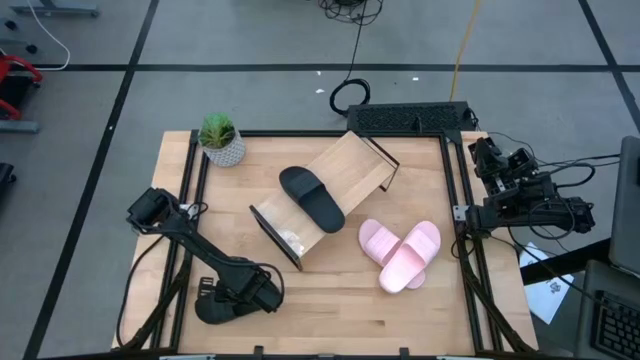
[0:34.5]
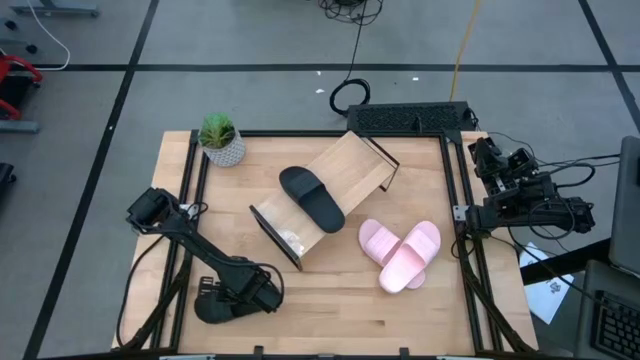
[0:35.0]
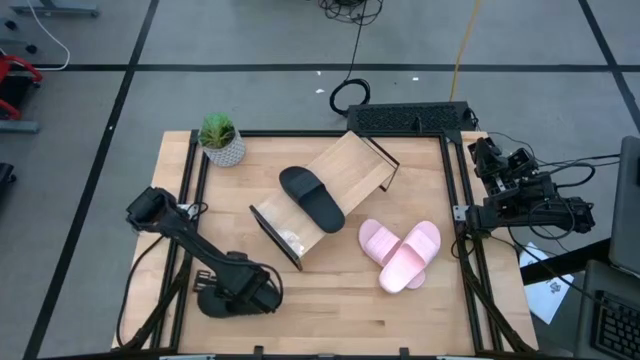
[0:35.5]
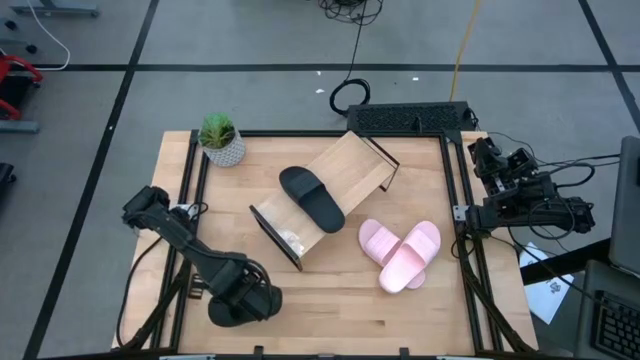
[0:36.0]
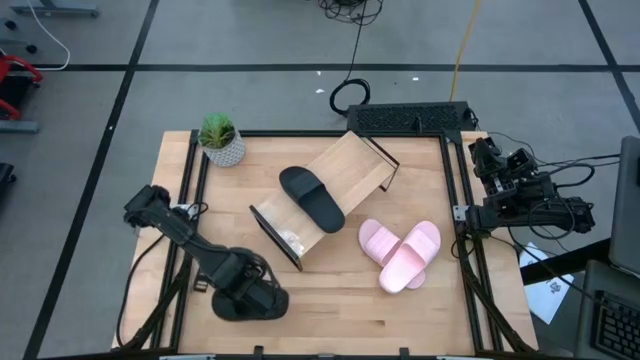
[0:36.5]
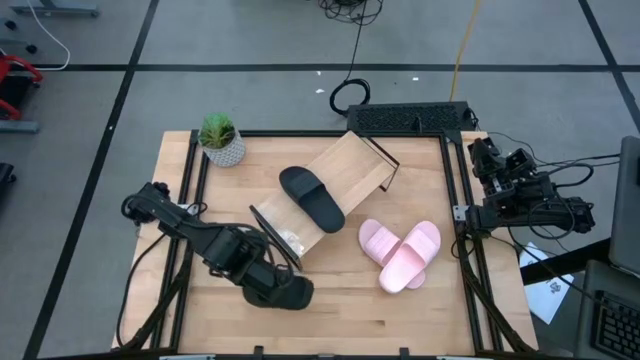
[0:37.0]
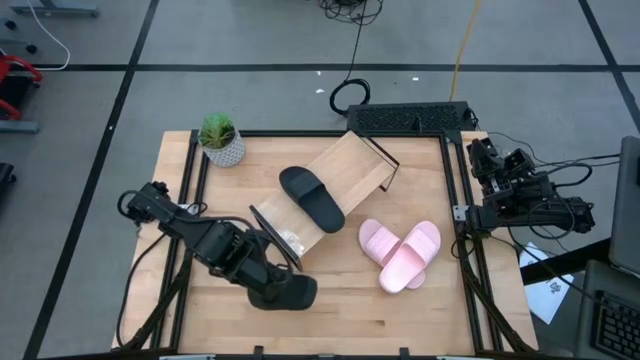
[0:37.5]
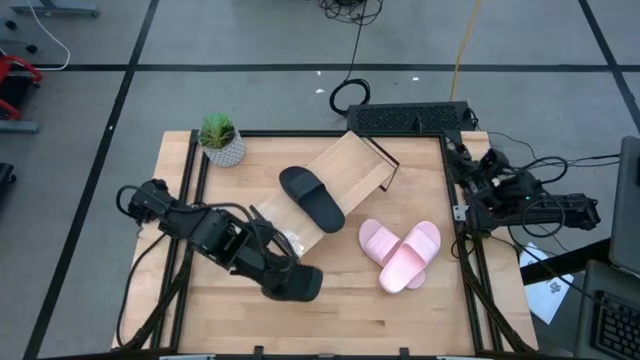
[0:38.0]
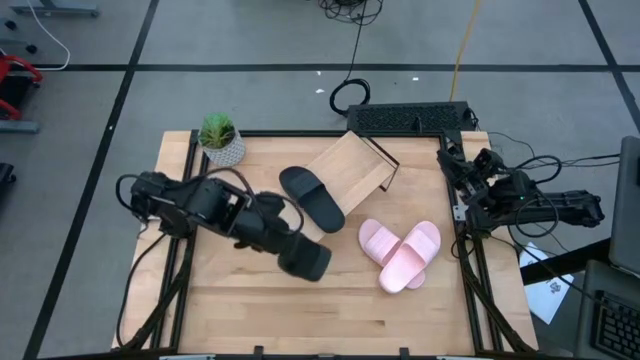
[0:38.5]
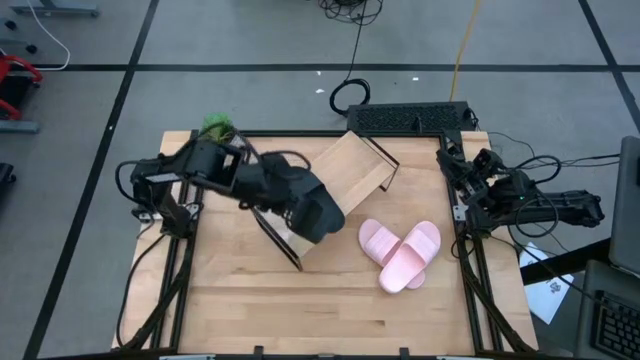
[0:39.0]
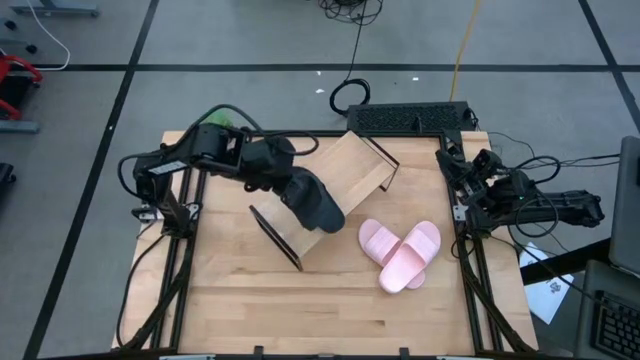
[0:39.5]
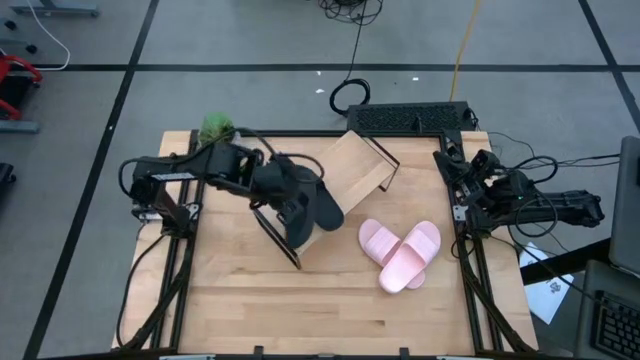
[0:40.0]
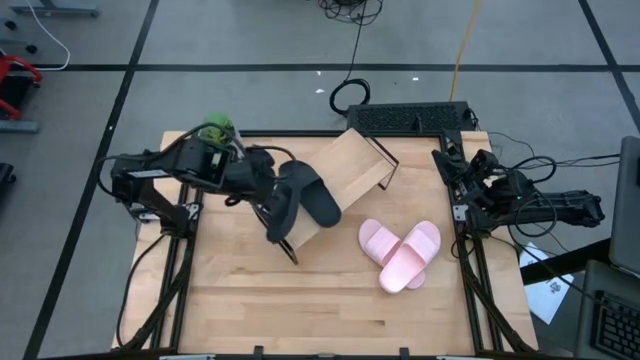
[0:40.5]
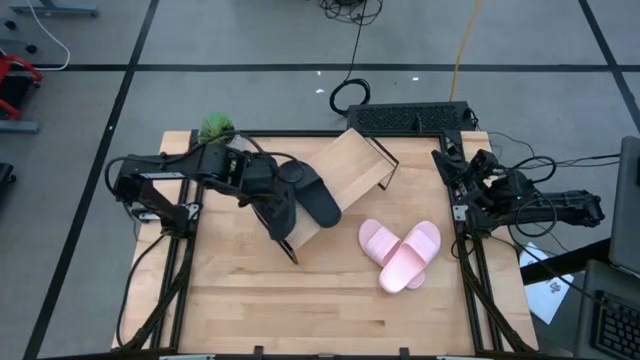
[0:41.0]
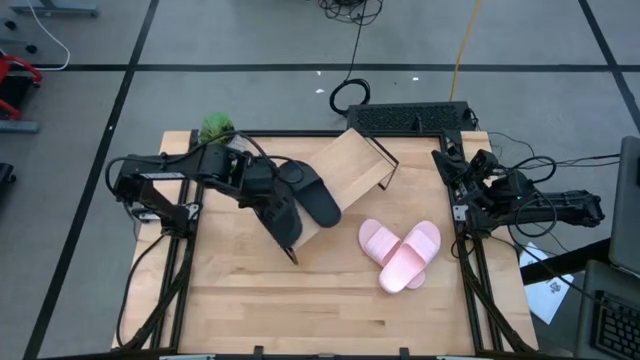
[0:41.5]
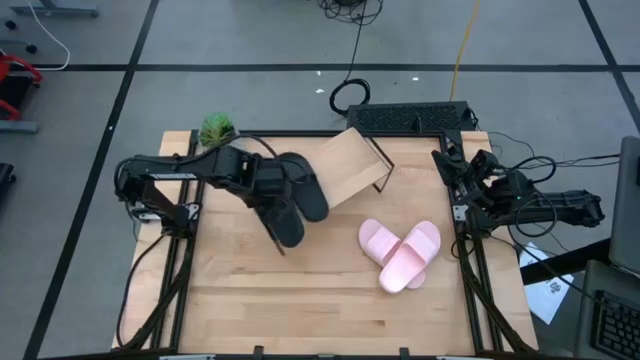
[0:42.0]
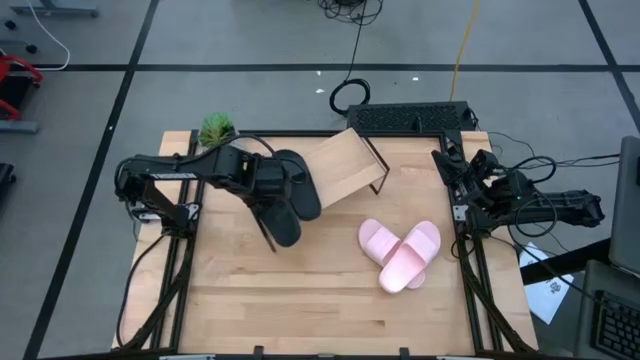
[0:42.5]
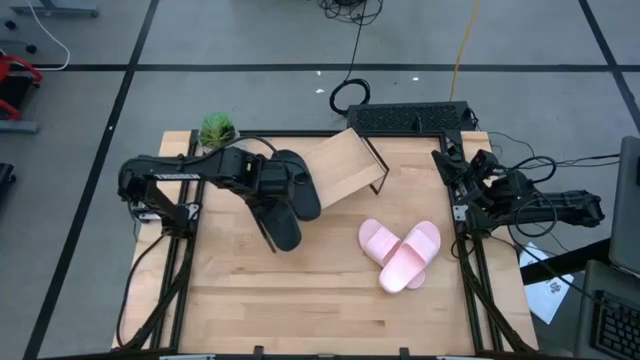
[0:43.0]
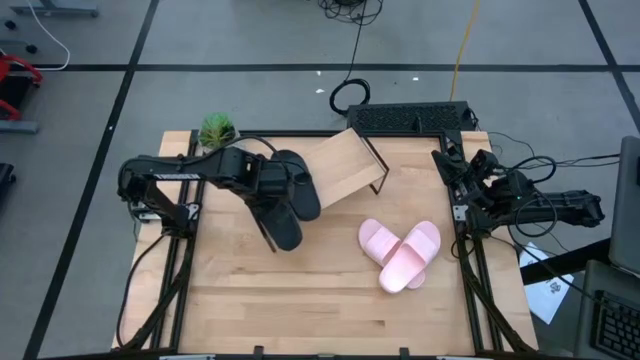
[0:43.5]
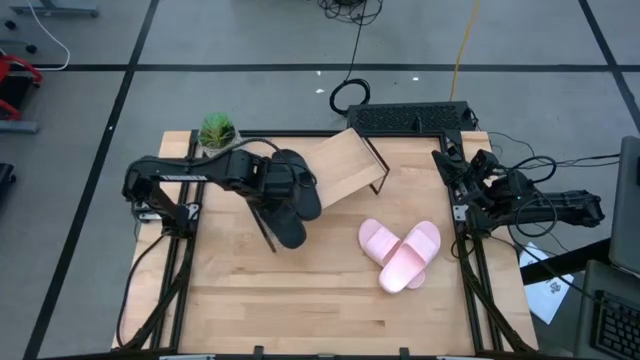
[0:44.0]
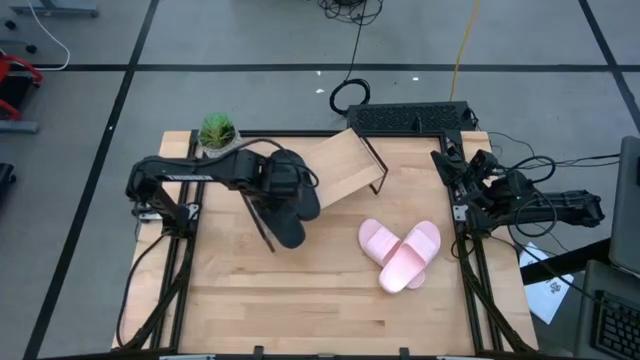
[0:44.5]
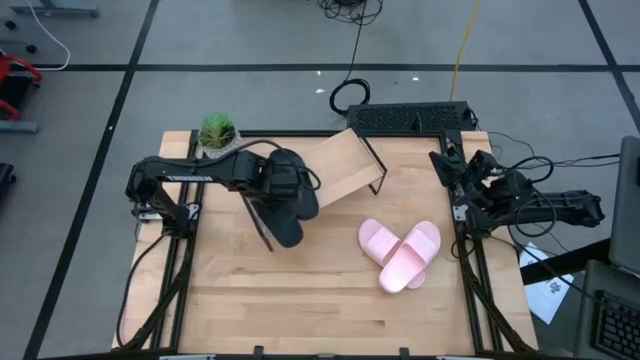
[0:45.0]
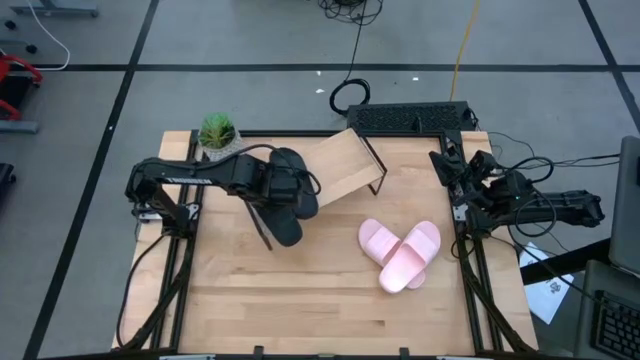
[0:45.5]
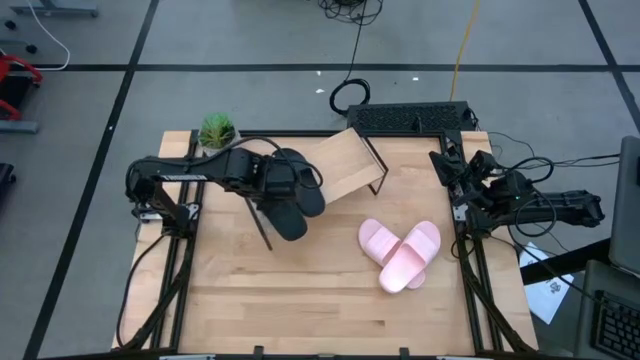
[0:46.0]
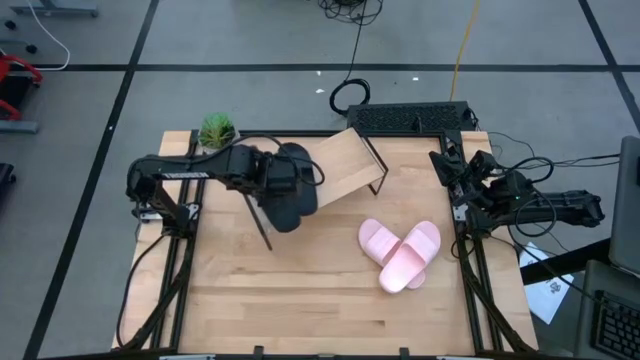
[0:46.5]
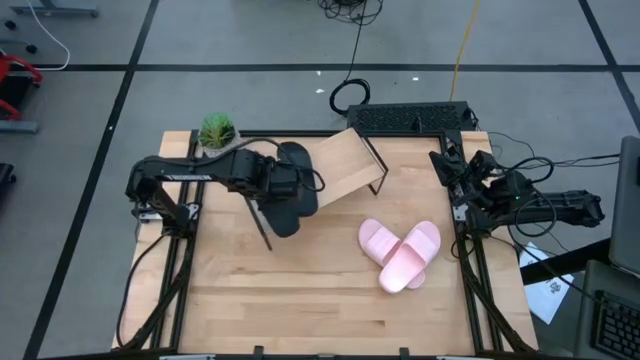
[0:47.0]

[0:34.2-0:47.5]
Task: Pick and place slides into the shelf
Put the black slide on the shelf

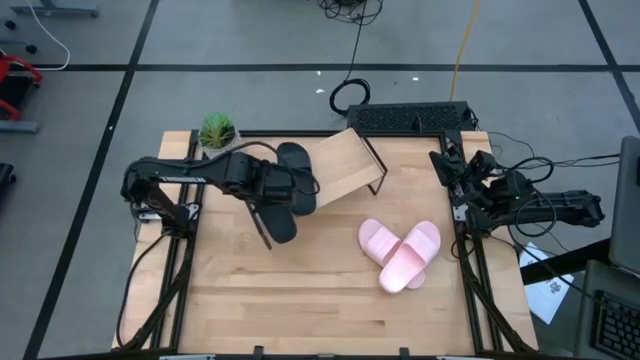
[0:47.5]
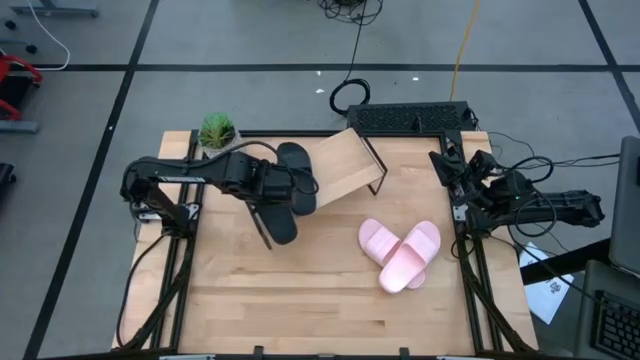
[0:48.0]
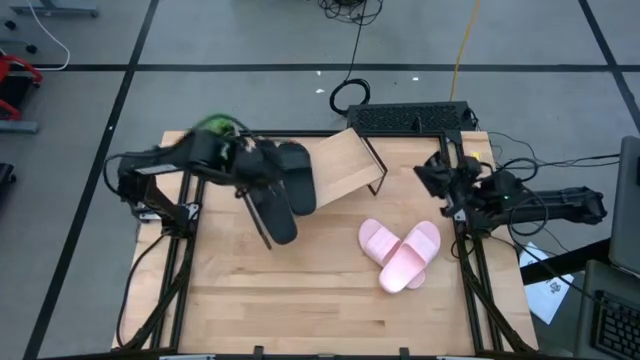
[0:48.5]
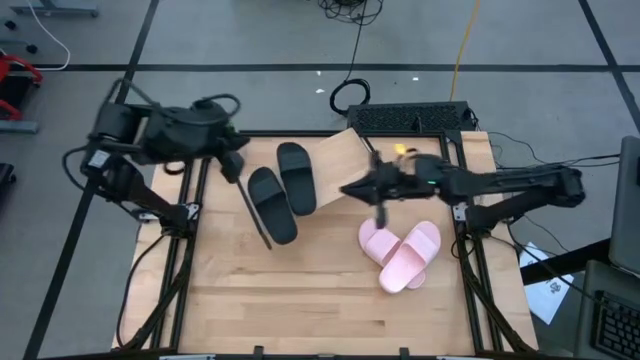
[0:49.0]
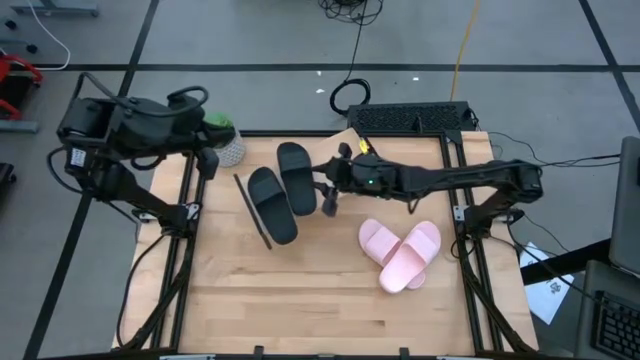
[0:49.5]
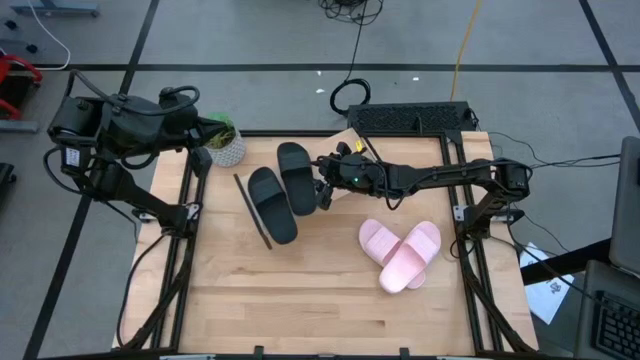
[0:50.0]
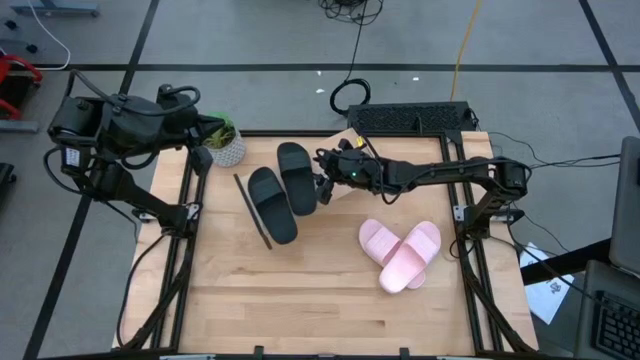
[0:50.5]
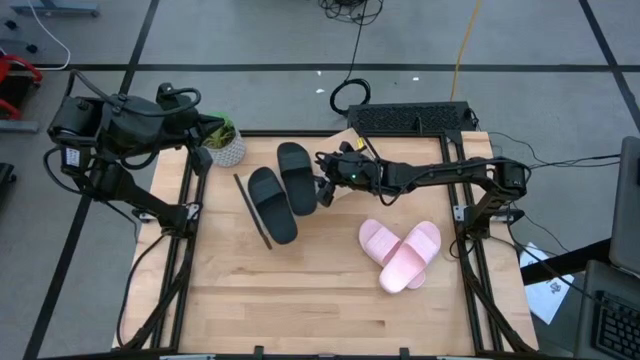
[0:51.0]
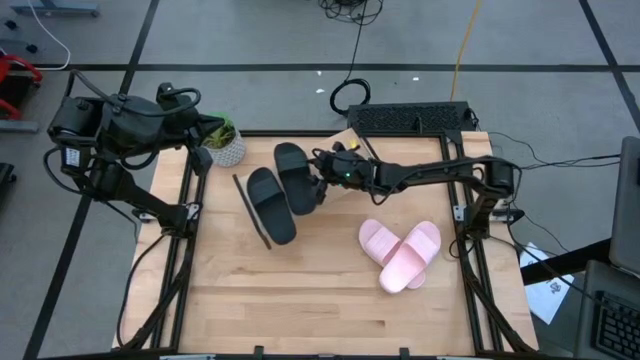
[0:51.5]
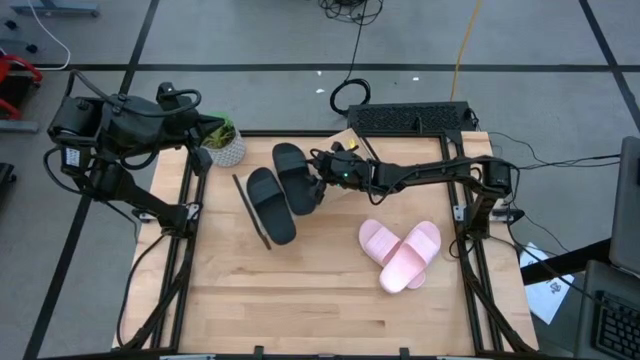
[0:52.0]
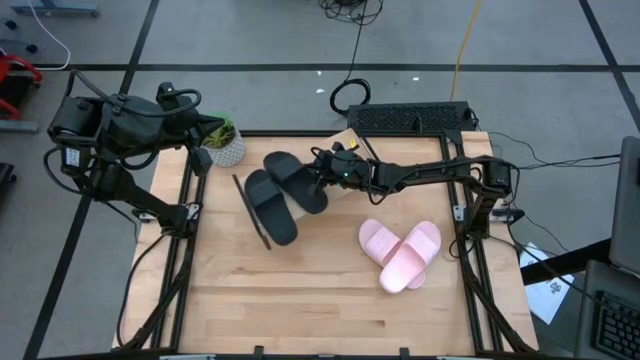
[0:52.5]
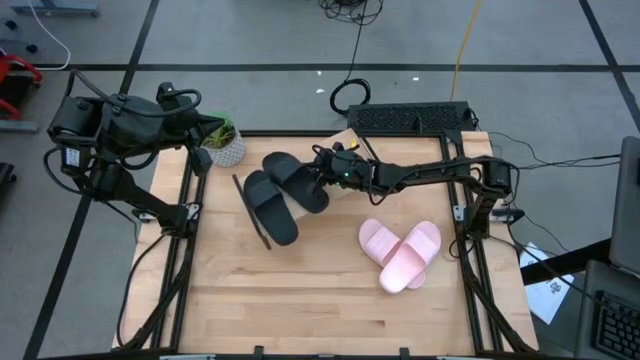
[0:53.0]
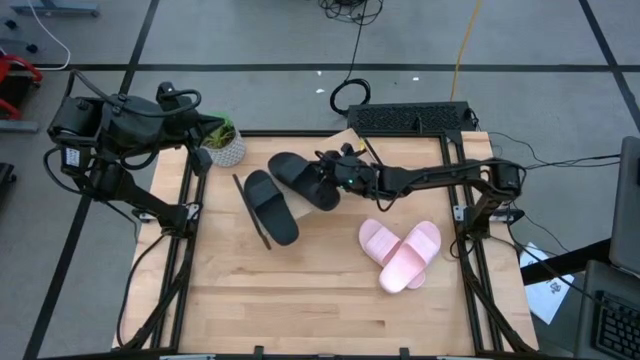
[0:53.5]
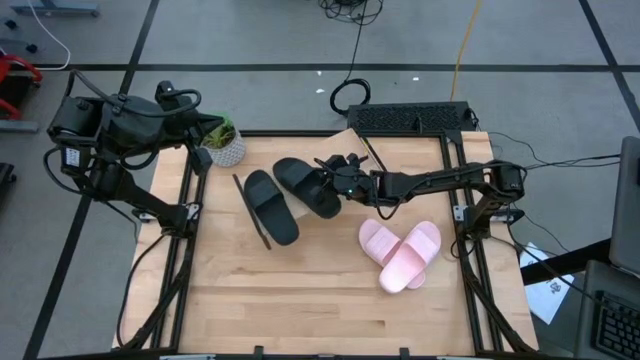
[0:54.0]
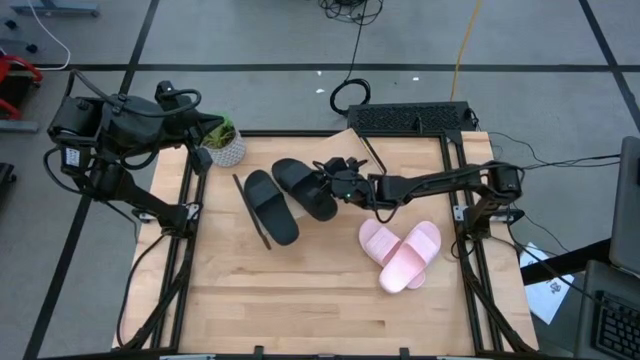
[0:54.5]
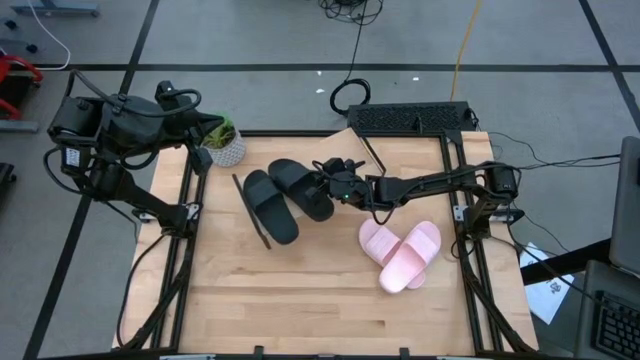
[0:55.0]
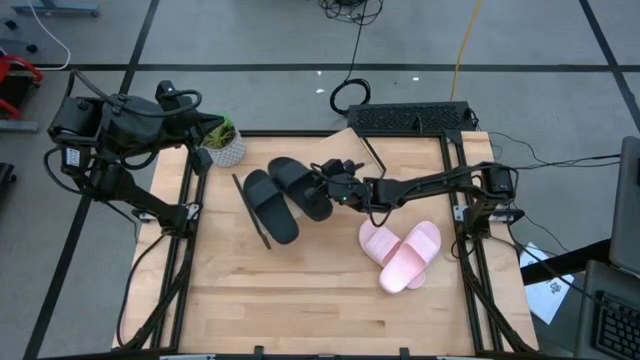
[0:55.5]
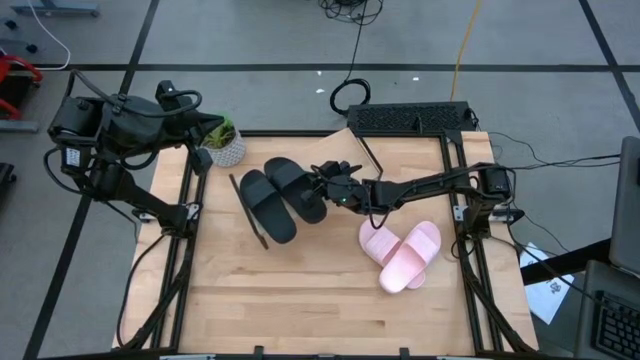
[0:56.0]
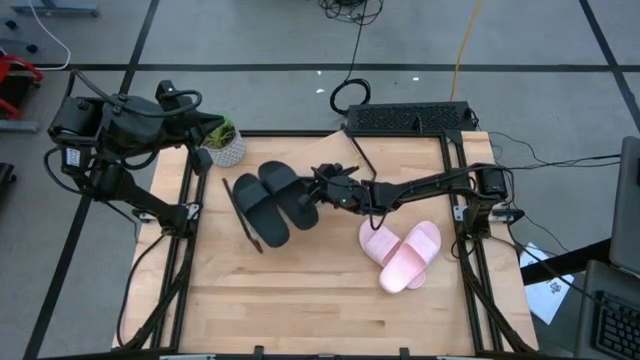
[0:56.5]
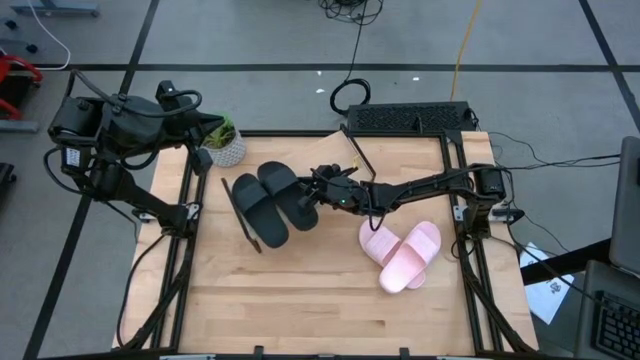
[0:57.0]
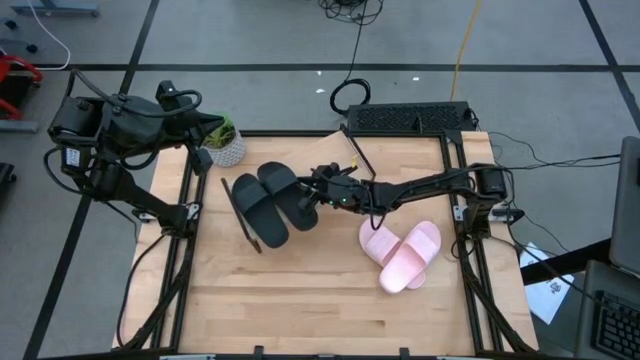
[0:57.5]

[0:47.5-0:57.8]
Adjust the black slide on the shelf
